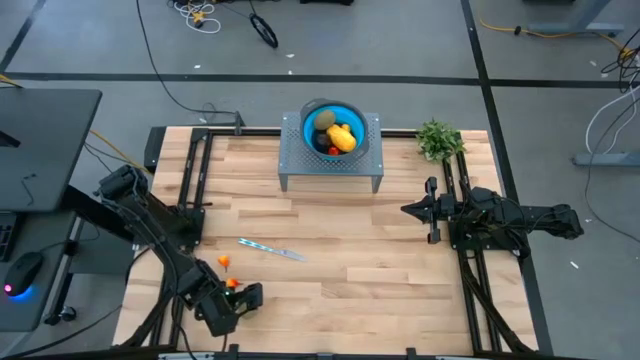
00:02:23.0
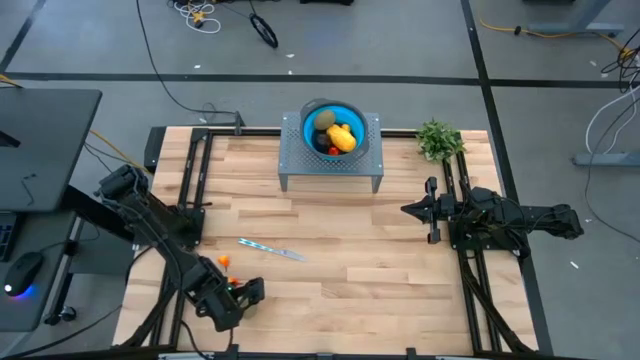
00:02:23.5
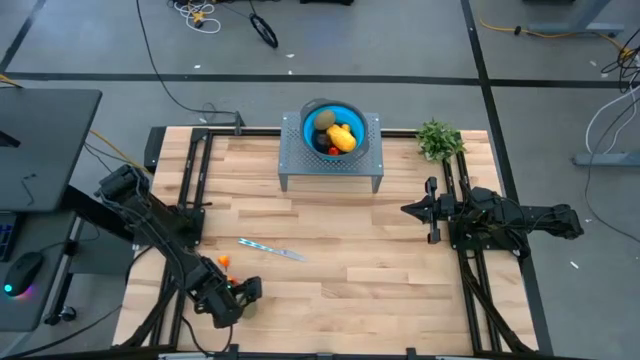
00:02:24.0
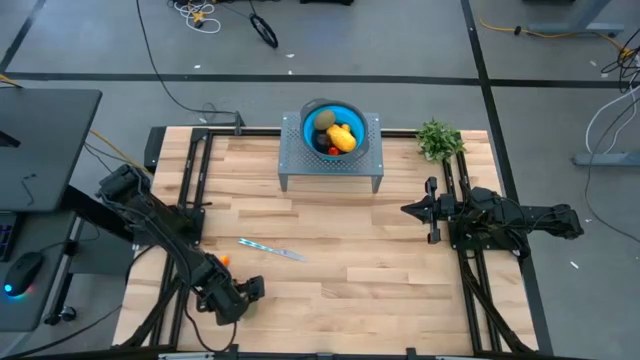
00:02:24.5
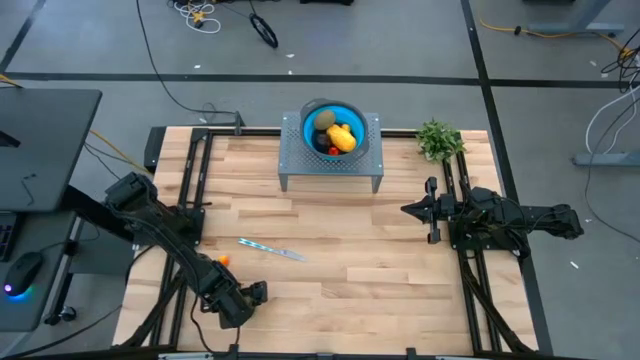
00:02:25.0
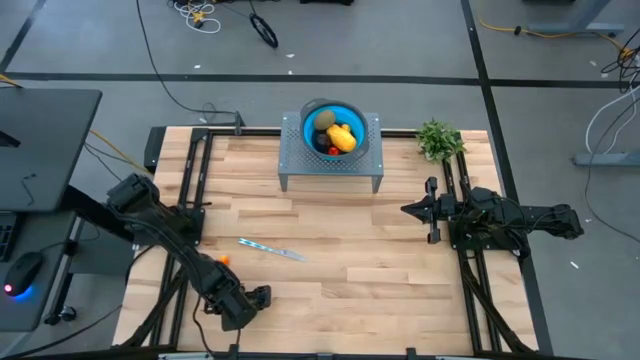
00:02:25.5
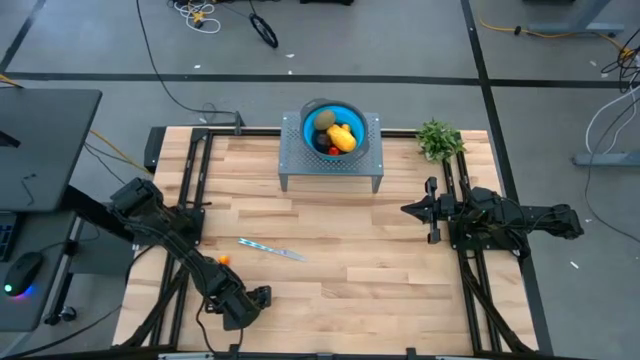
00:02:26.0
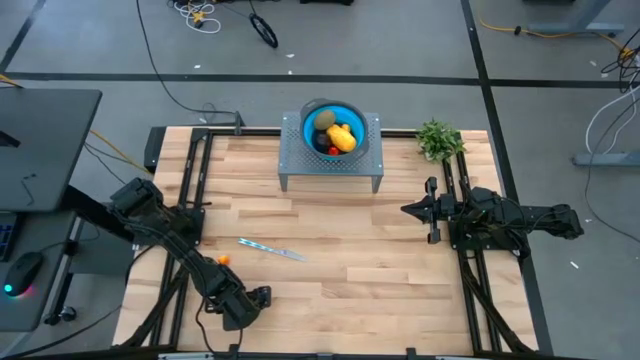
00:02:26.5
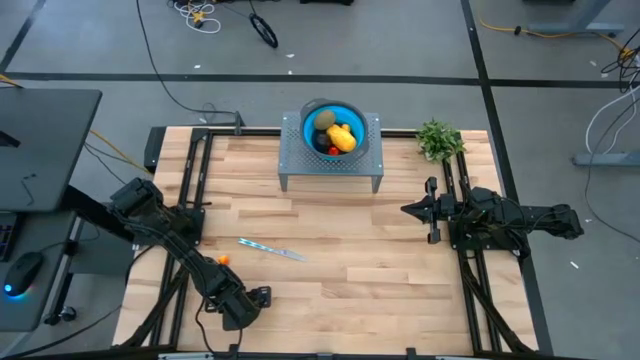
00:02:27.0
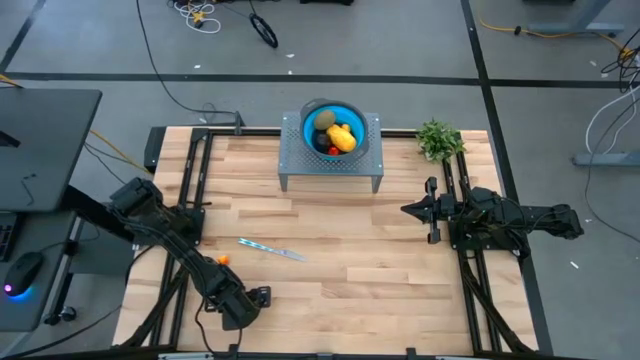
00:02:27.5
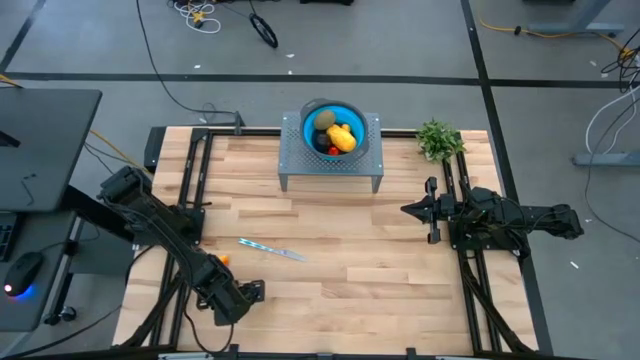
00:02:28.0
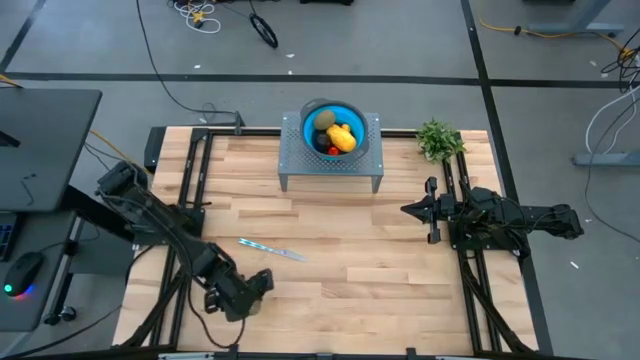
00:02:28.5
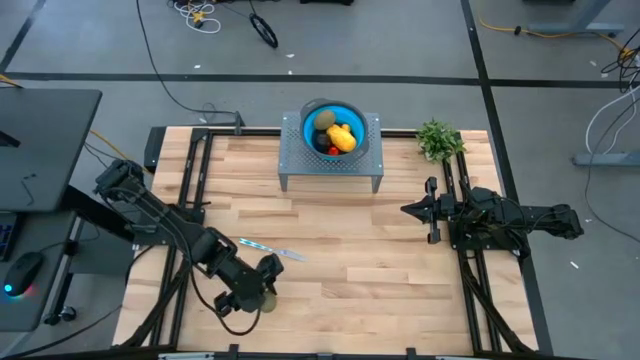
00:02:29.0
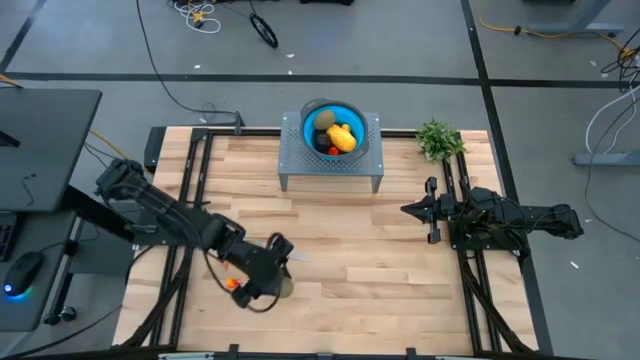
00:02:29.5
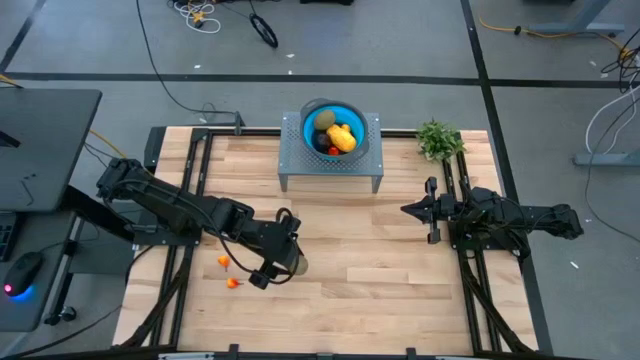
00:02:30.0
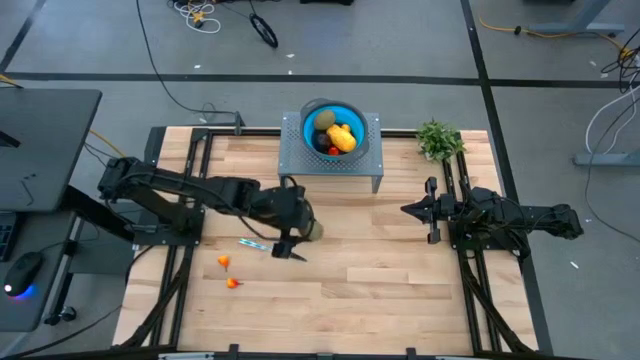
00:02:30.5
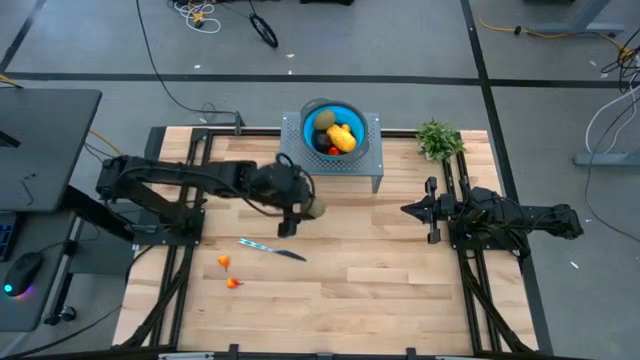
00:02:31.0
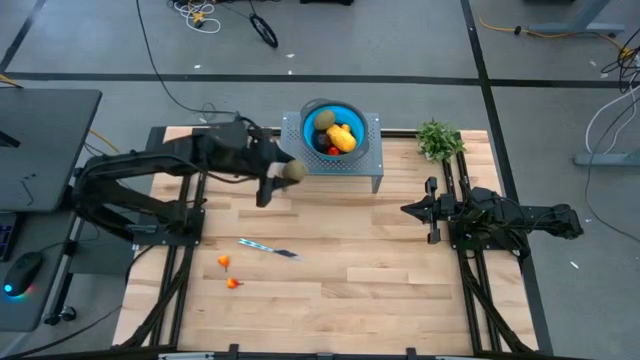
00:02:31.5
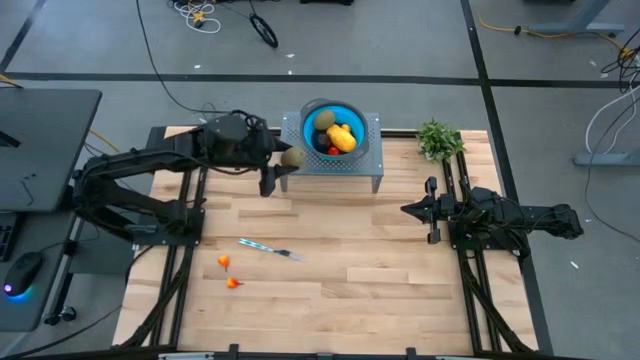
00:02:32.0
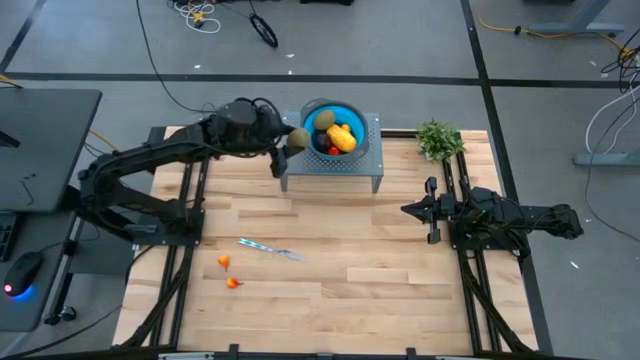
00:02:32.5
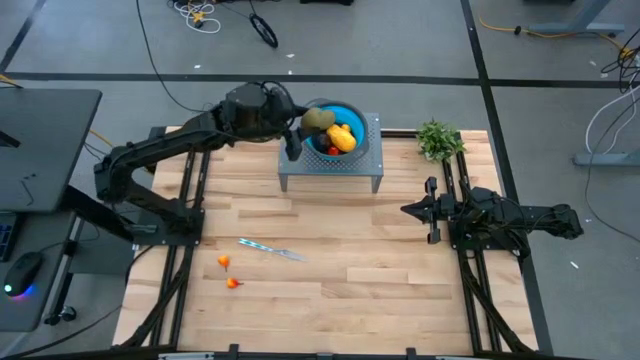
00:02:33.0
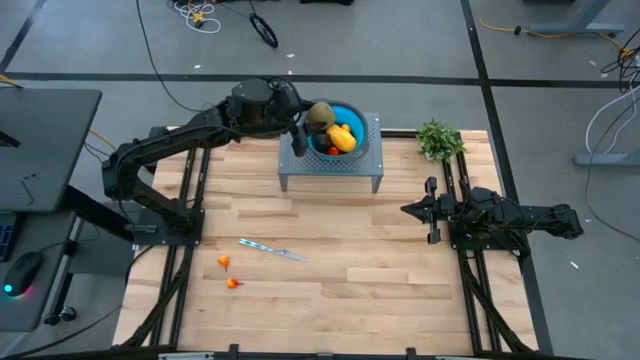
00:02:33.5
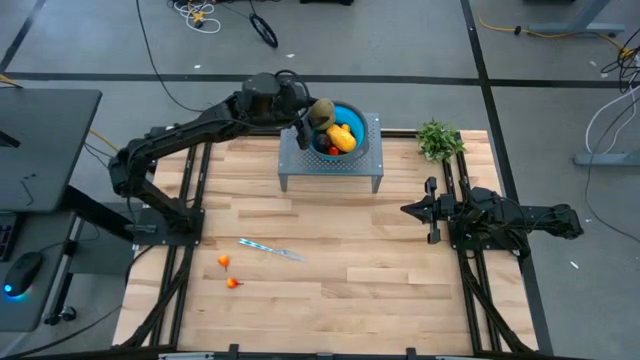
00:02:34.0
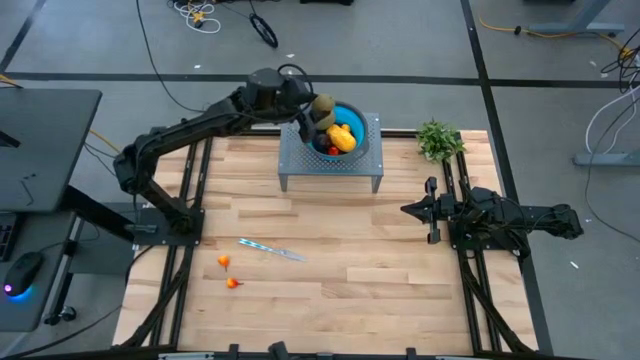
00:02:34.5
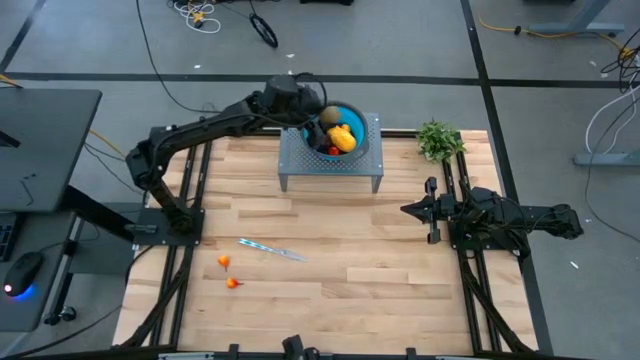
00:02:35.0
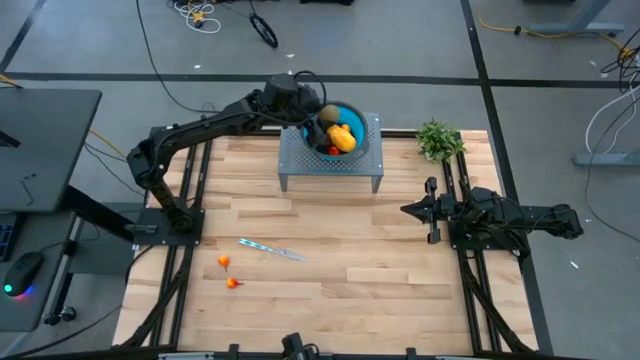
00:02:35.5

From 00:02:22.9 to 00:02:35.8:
Task: Pick & Place Fruit
Put the kiwi into the blue bin

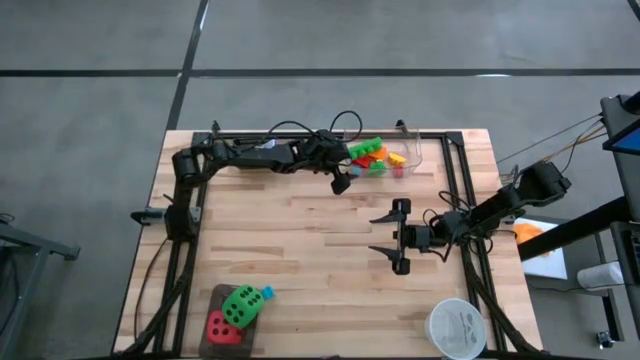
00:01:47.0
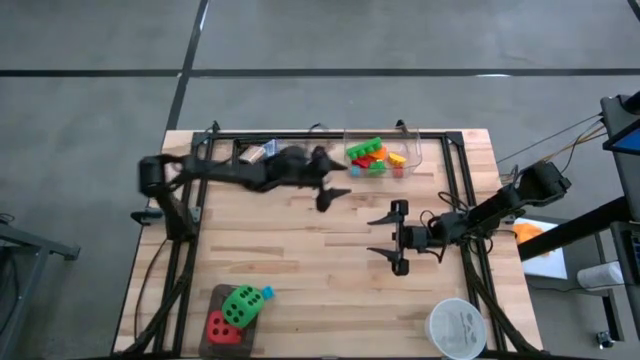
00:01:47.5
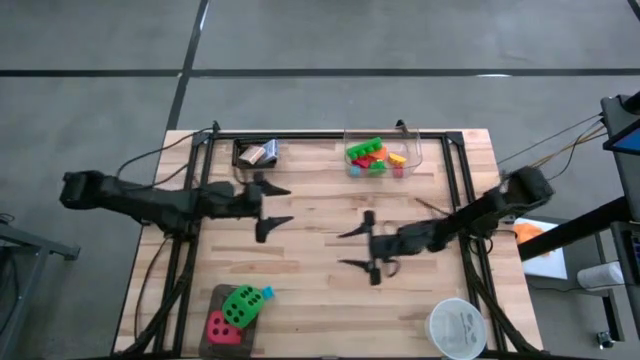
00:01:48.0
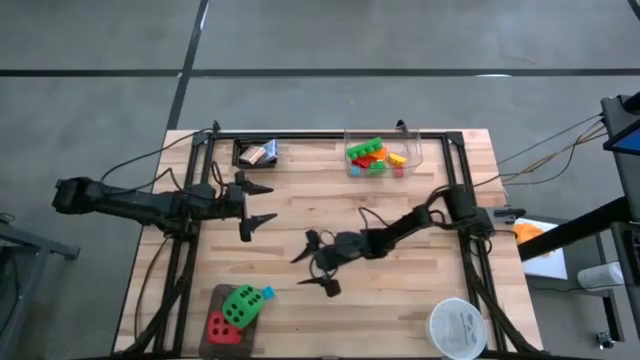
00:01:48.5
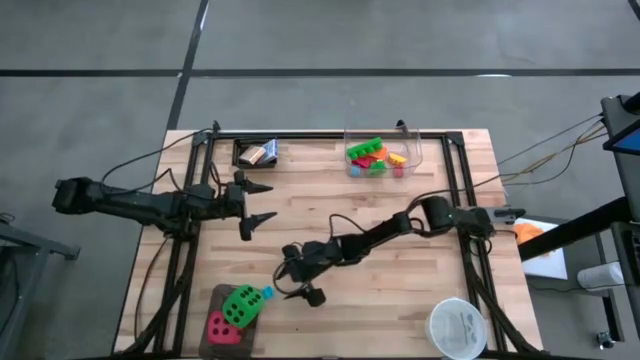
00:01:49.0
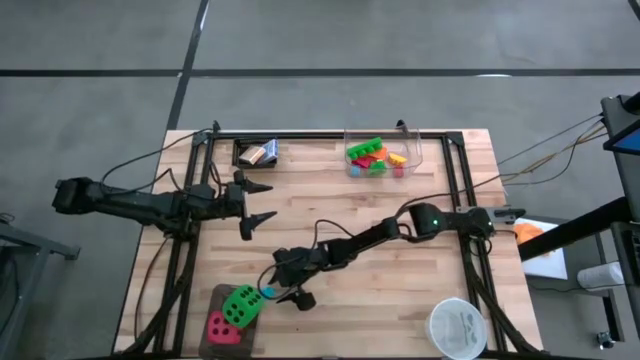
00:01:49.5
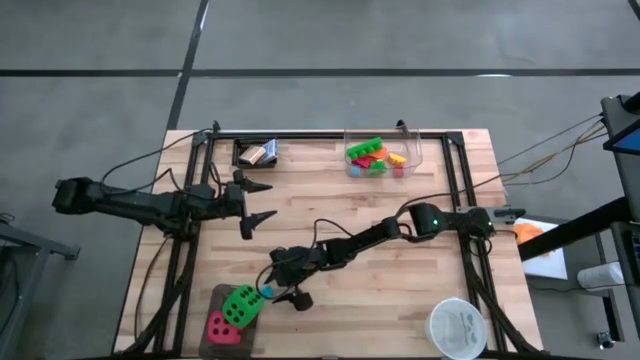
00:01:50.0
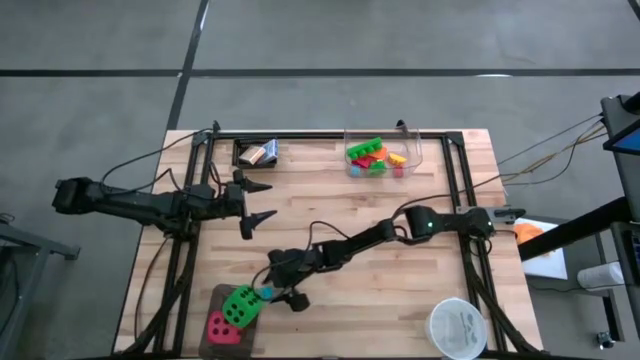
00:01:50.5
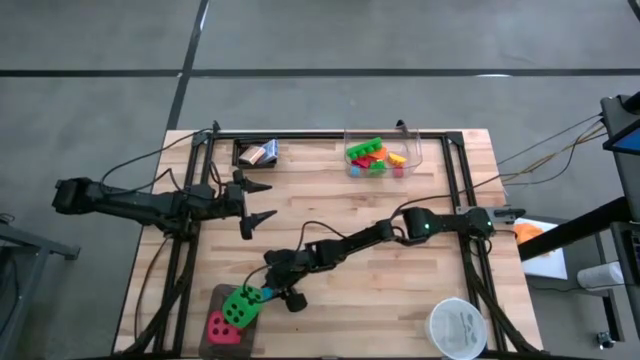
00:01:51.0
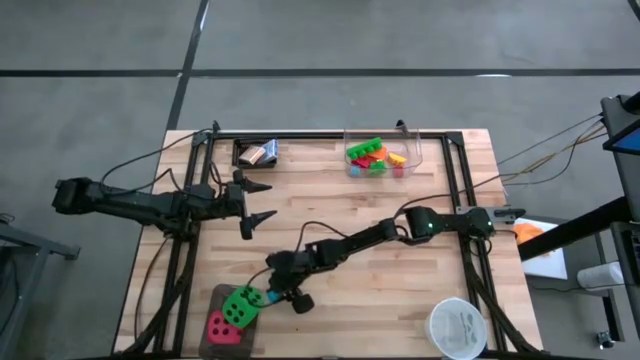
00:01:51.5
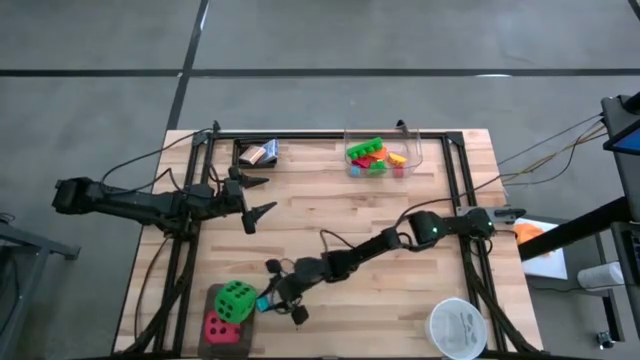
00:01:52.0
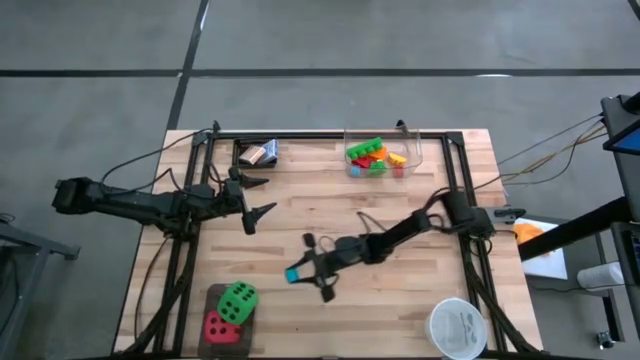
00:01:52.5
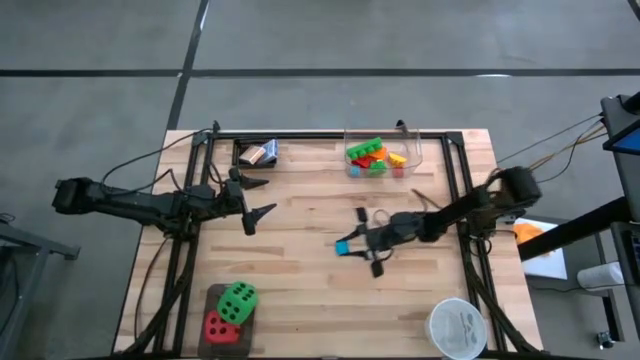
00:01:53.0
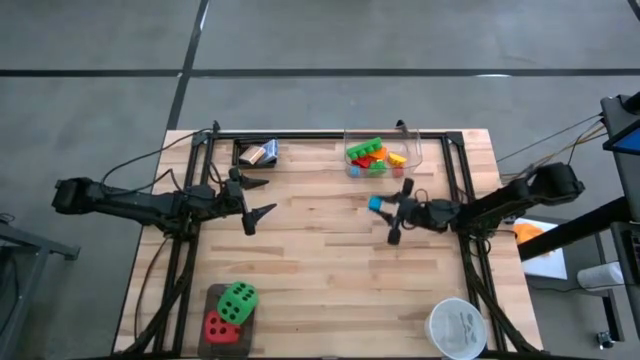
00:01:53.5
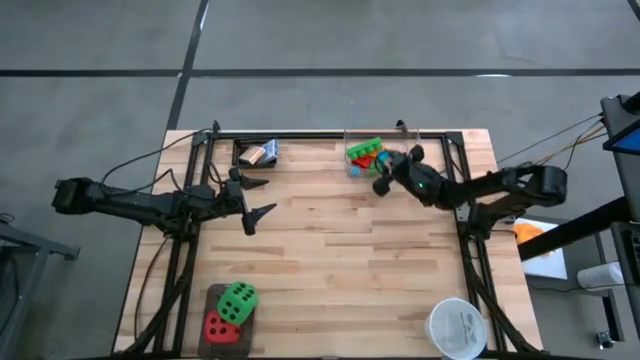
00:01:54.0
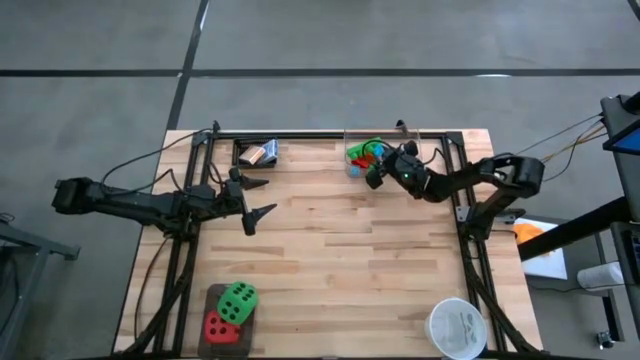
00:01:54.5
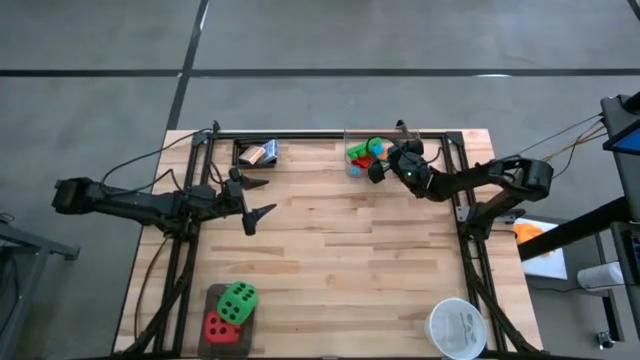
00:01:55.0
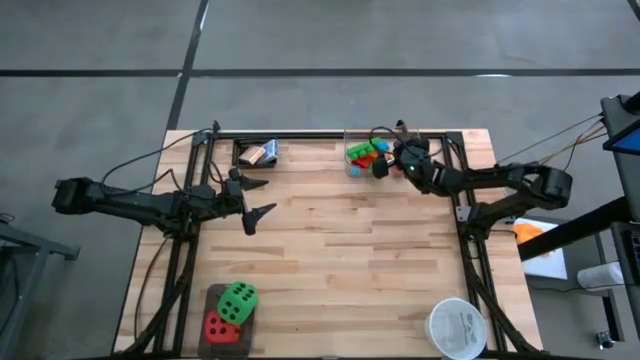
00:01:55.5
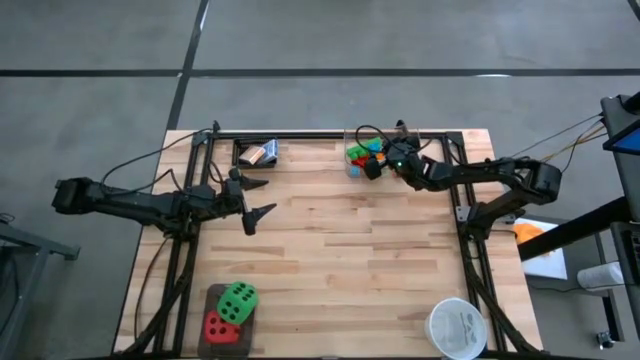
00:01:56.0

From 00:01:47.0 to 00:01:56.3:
Task: Pick & Place Toys
Put the blue game piece into the transparent bin
